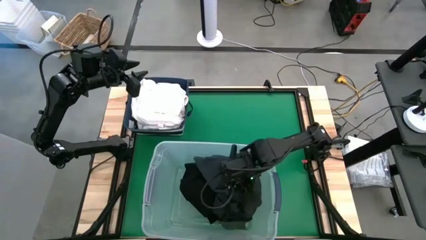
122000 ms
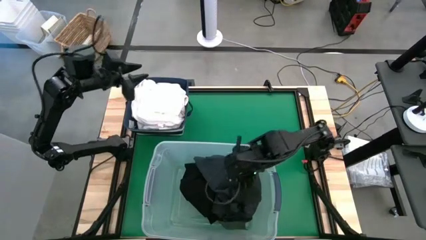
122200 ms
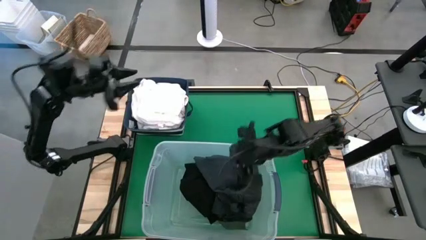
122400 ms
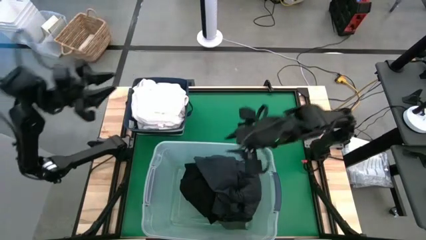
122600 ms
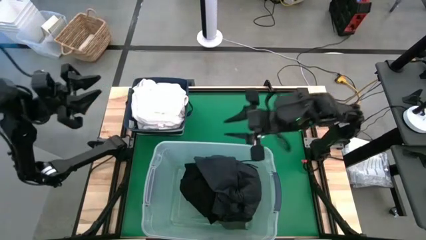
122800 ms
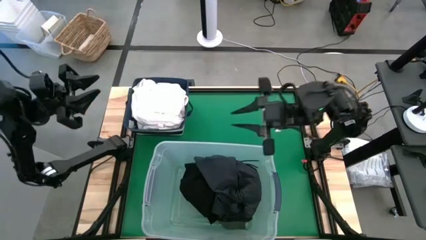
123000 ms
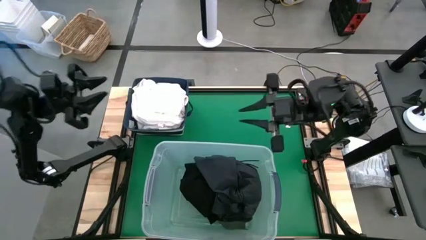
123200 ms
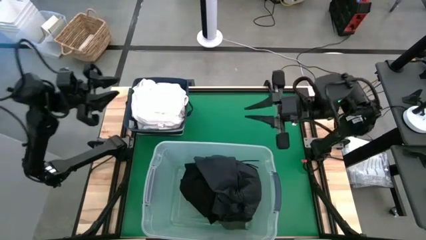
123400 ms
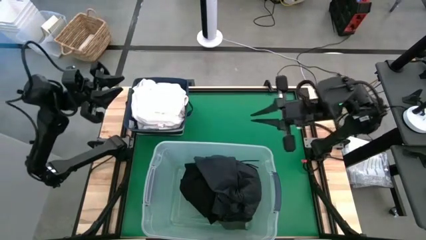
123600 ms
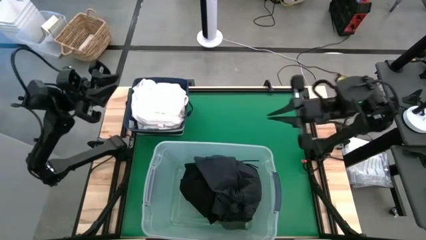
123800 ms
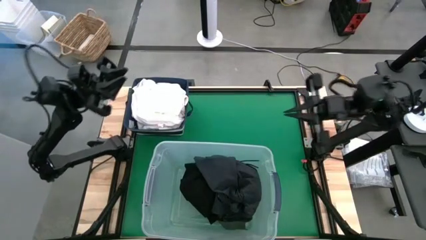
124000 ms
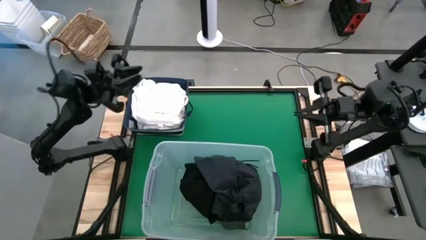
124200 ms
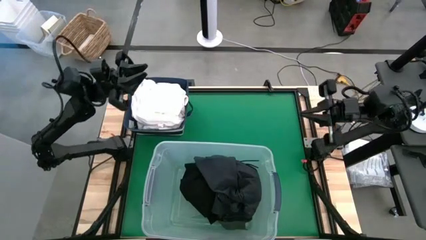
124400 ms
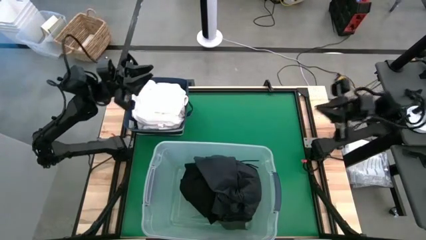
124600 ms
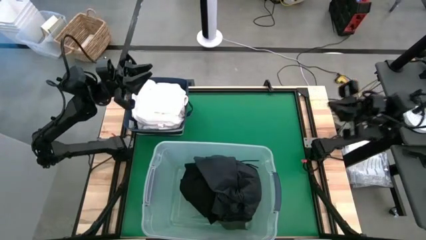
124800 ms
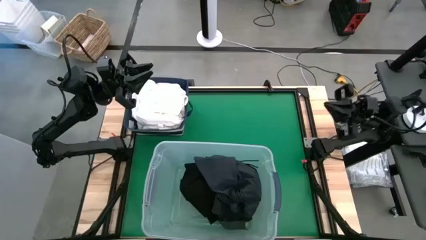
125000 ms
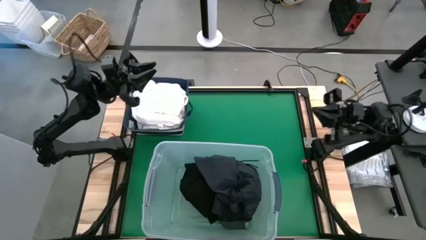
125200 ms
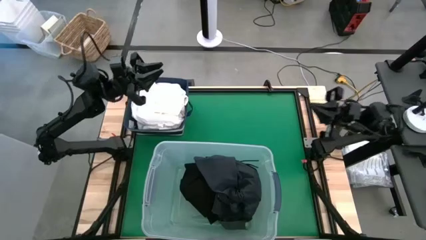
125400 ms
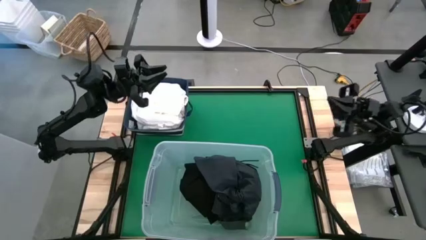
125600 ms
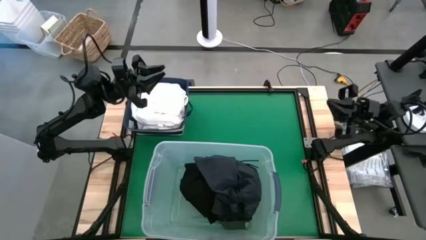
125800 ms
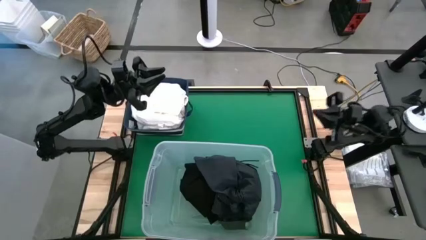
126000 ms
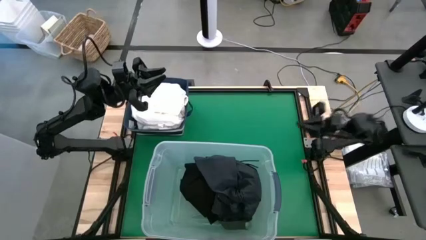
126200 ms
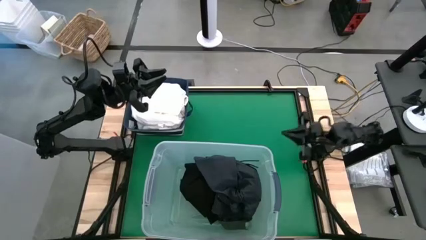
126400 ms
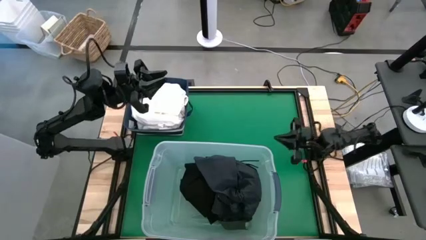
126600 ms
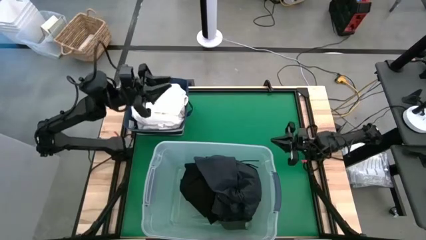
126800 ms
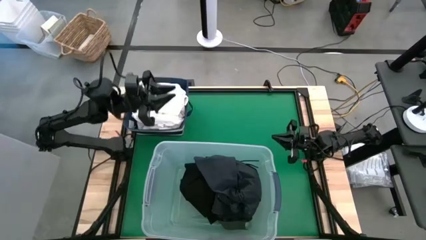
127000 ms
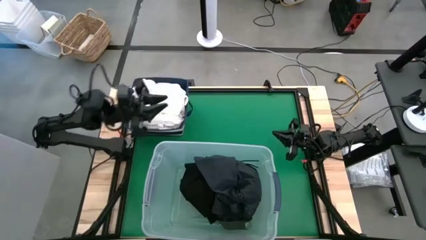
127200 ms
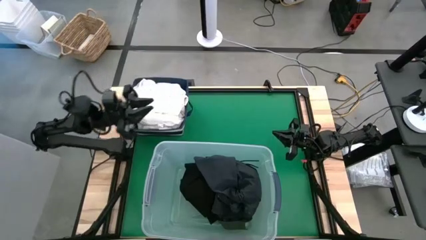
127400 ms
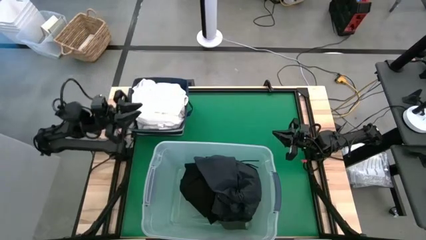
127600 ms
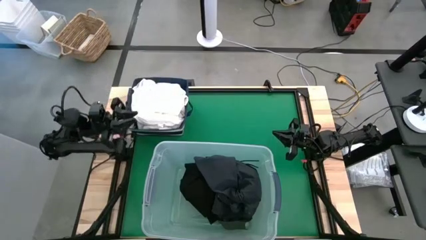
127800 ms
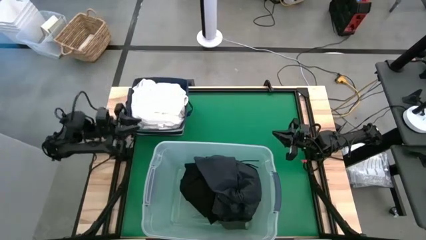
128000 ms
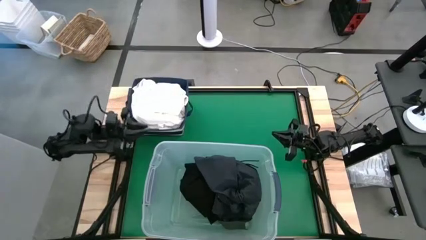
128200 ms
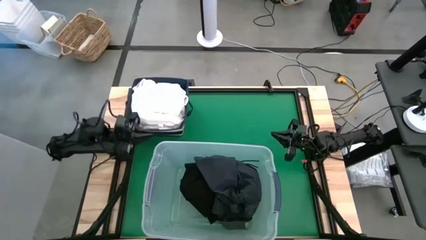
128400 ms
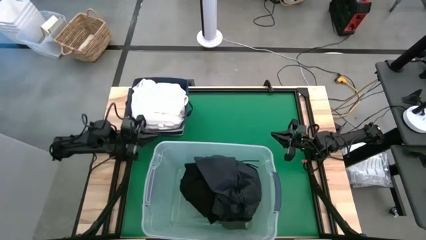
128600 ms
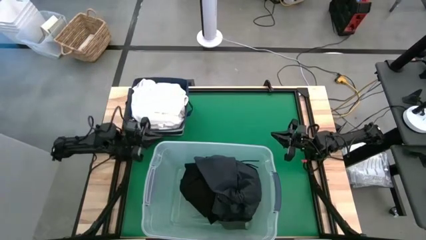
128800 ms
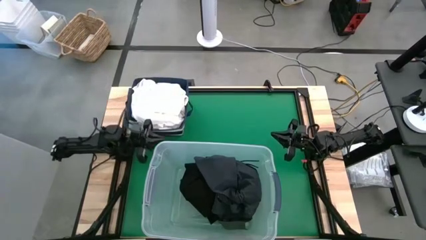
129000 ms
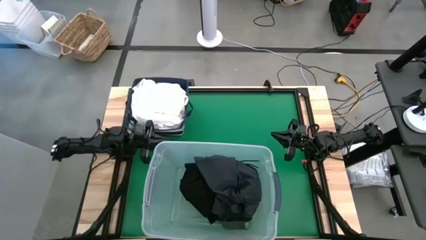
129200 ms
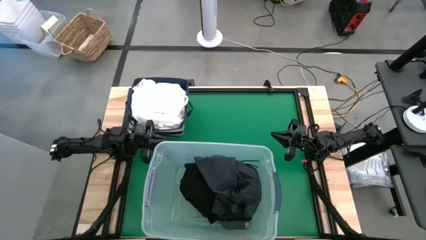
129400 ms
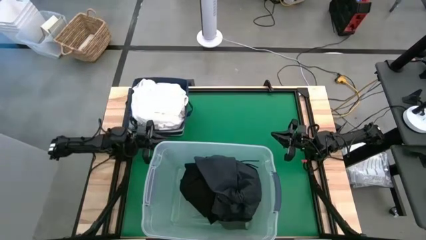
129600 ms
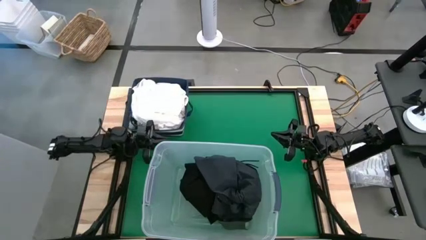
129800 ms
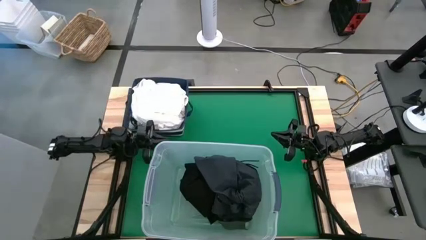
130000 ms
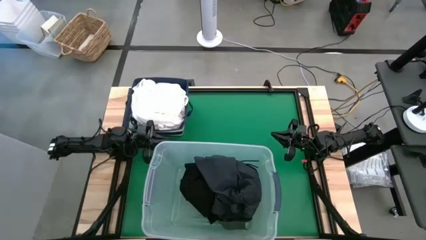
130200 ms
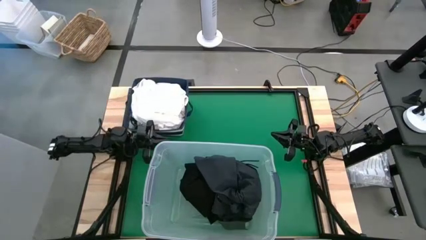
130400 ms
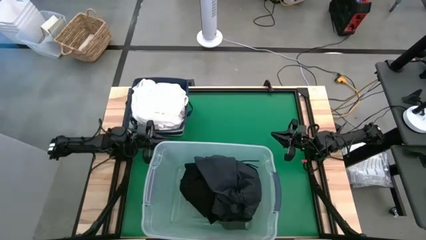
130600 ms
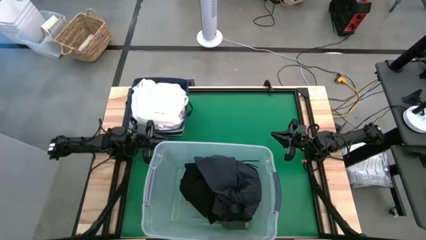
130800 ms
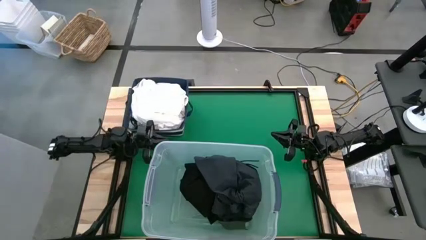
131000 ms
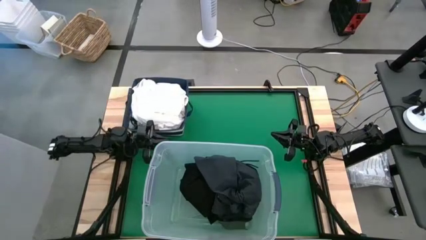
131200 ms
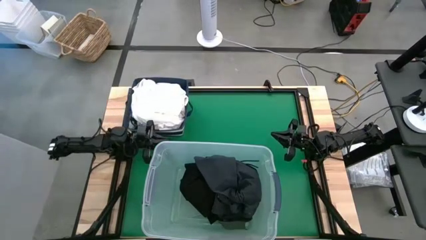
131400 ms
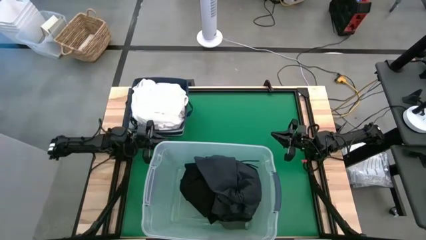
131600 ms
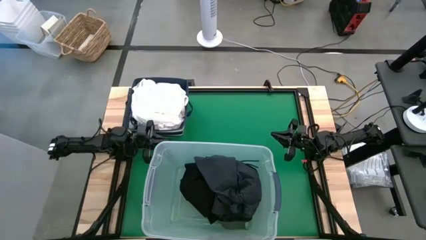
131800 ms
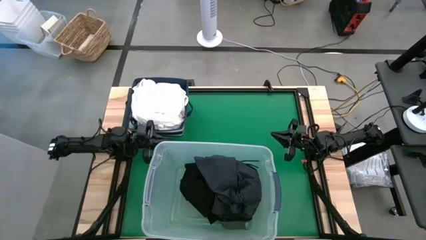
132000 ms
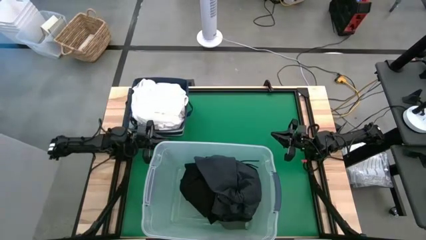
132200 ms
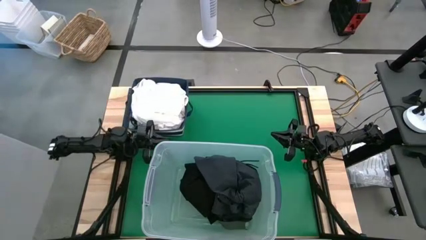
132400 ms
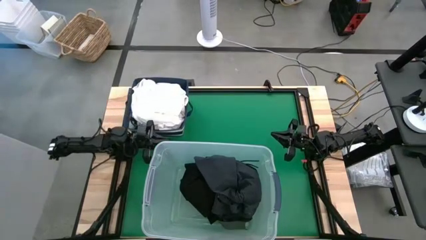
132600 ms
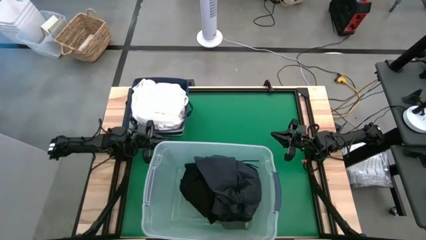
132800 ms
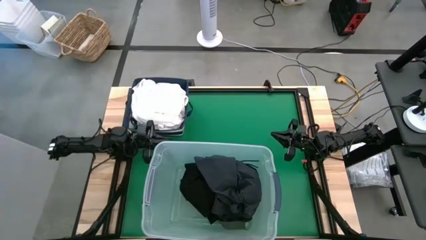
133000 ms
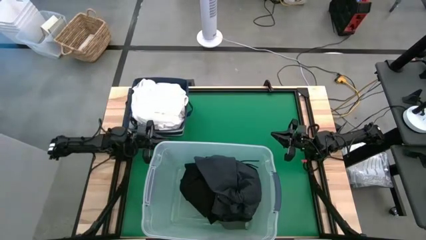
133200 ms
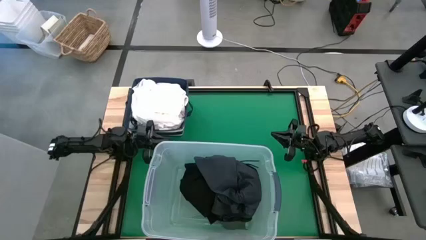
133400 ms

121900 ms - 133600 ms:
Return to Home Position
